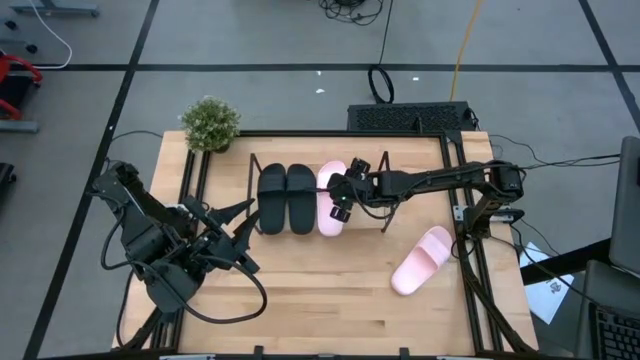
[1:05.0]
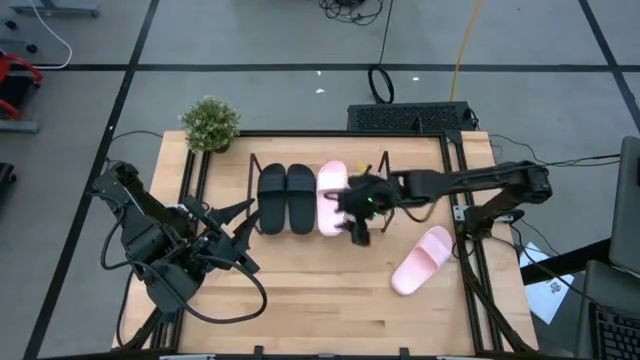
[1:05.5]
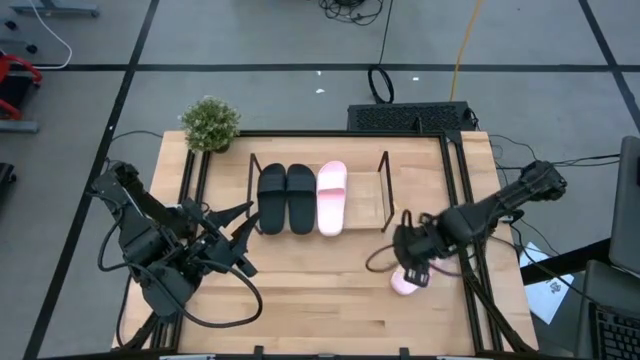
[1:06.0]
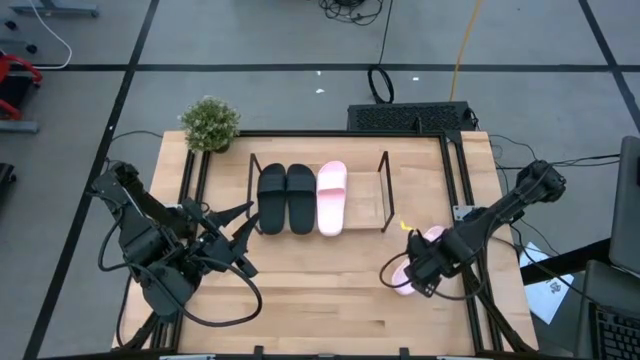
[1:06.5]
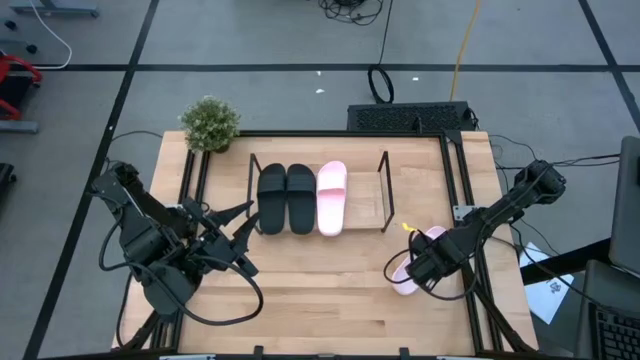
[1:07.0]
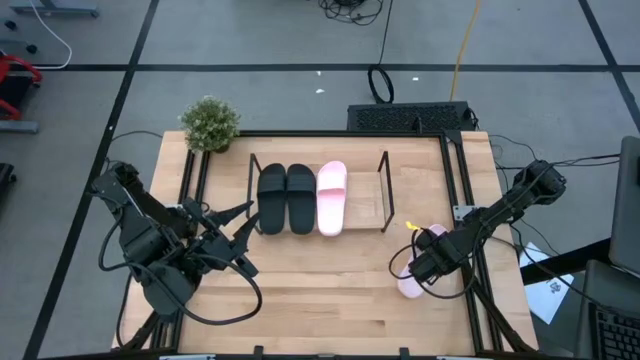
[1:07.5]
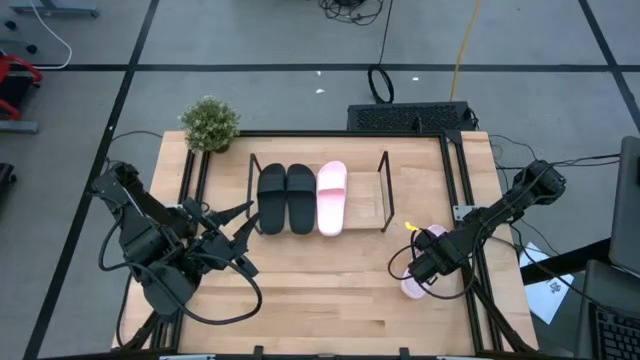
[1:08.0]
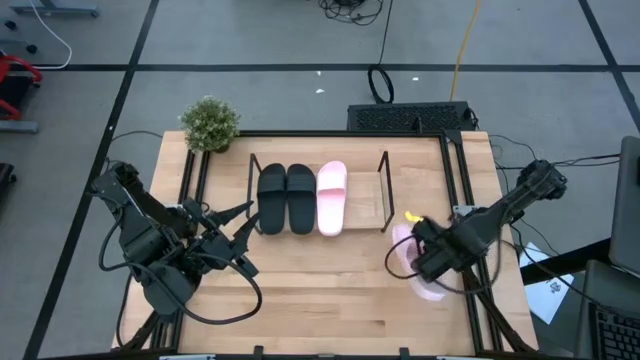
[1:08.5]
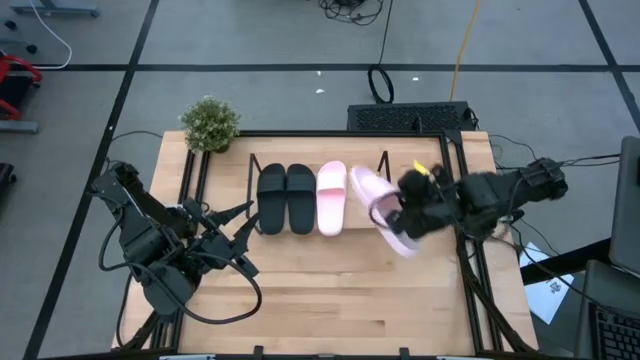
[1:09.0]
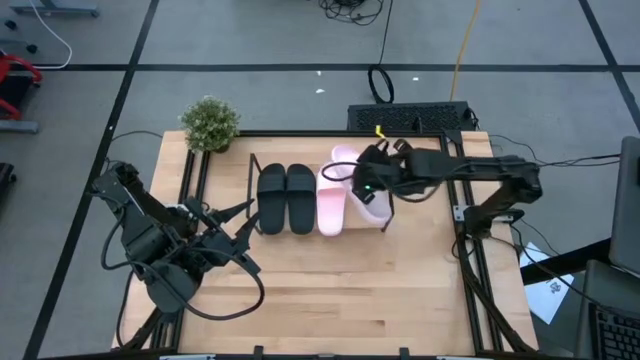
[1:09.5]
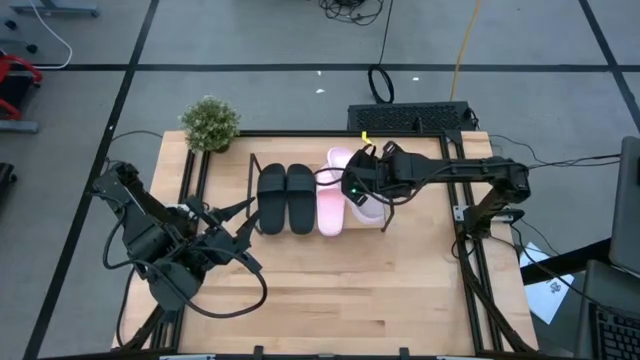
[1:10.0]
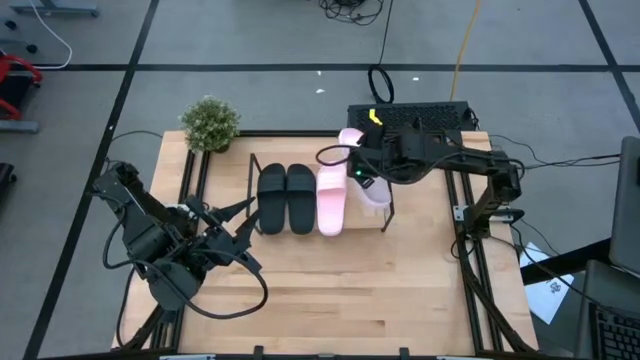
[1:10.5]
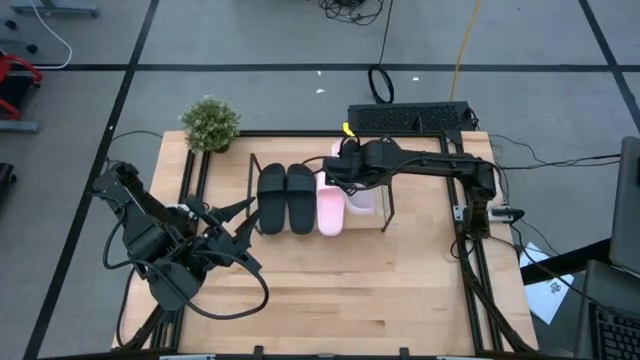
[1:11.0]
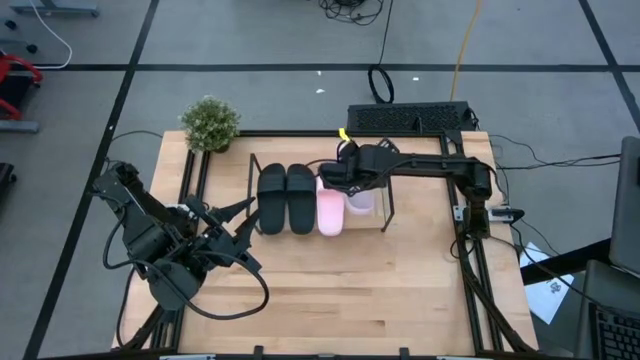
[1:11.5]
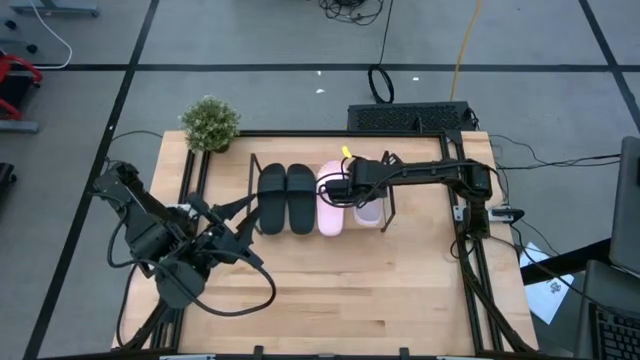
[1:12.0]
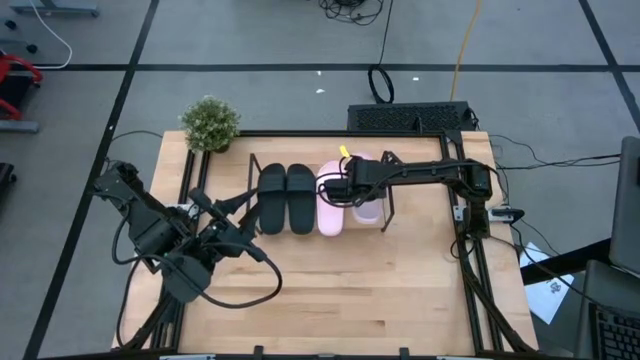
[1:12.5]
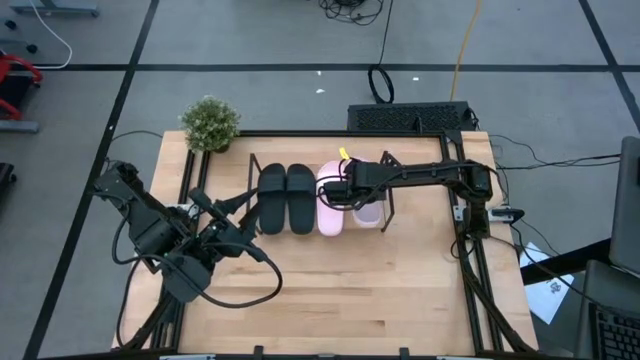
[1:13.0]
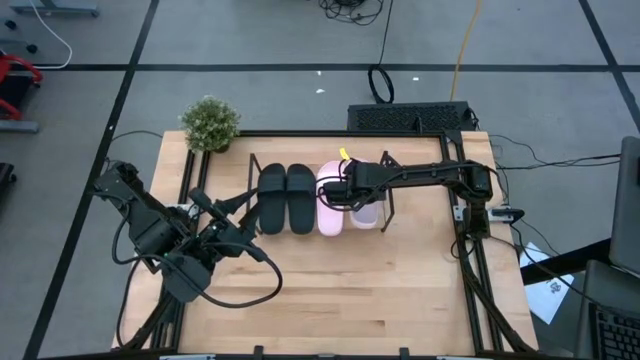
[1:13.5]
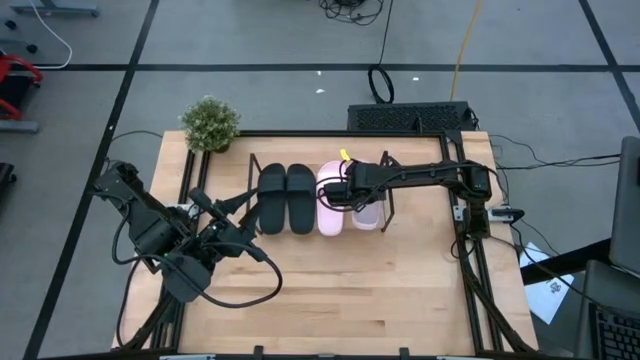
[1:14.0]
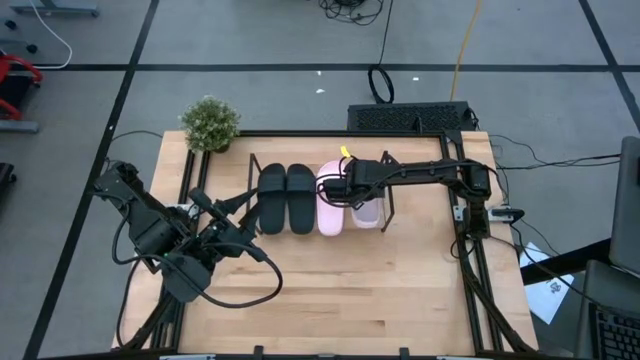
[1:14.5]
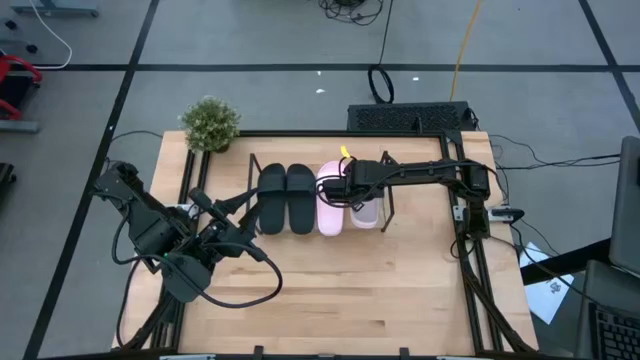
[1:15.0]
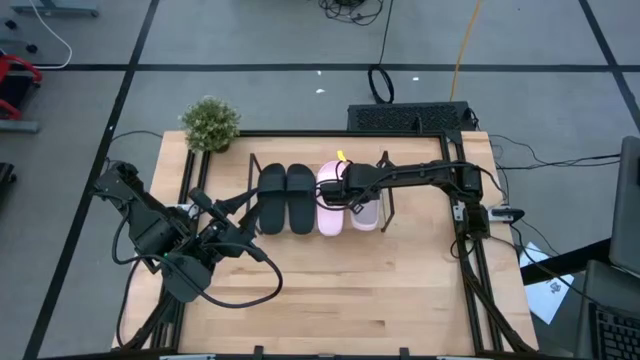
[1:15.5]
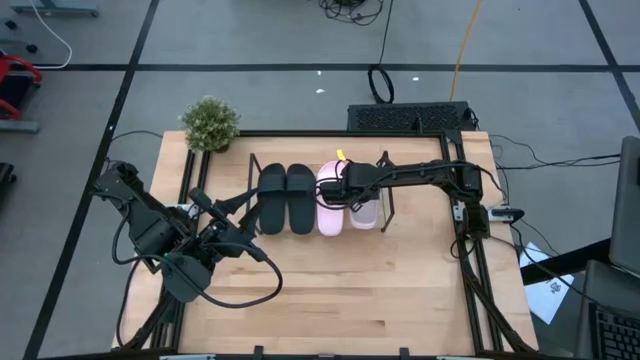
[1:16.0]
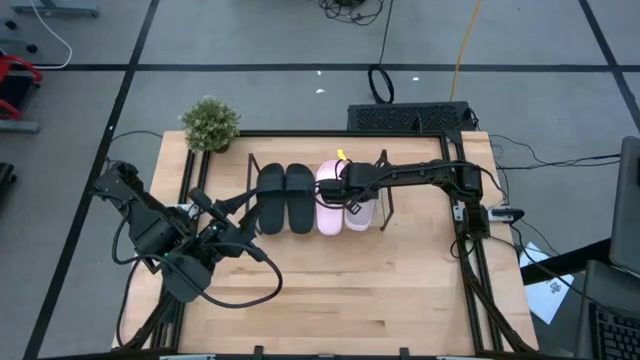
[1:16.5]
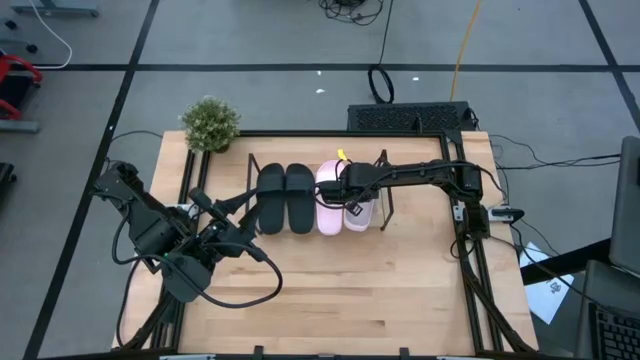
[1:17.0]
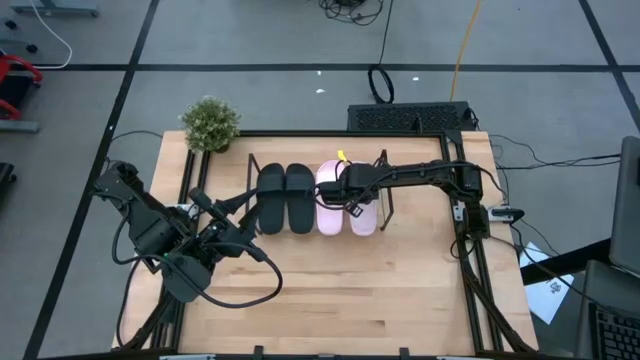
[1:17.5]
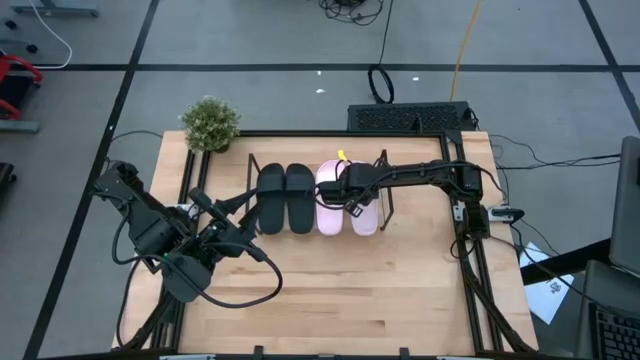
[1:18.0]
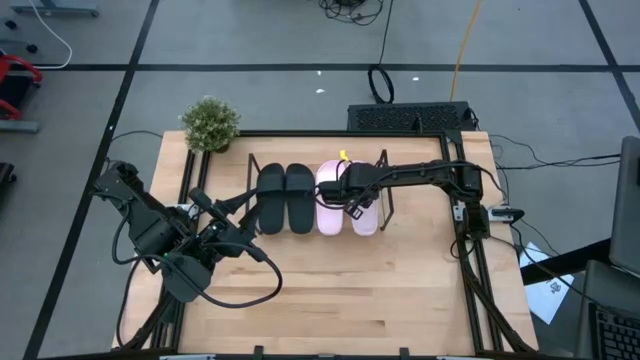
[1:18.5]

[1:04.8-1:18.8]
Task: Pick and place slides into the shelf
Put the pink slipper on the shelf

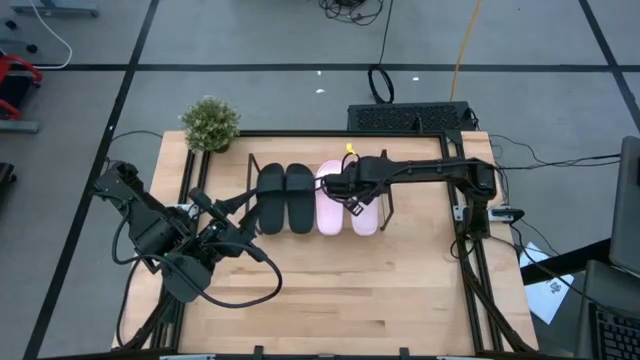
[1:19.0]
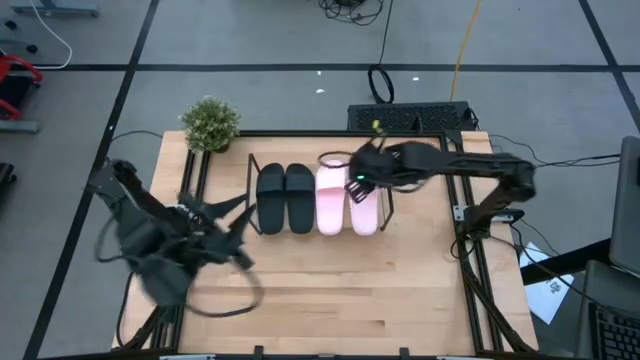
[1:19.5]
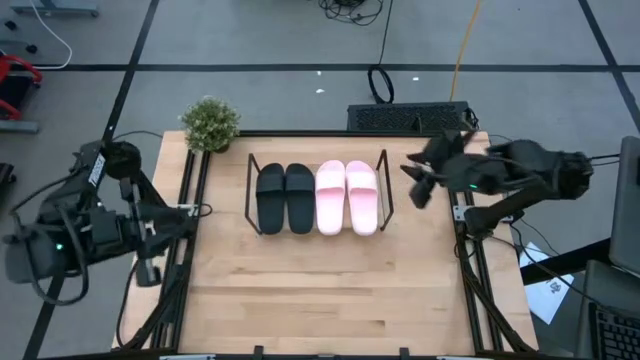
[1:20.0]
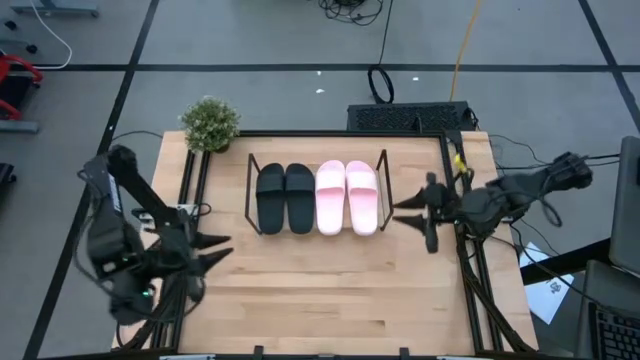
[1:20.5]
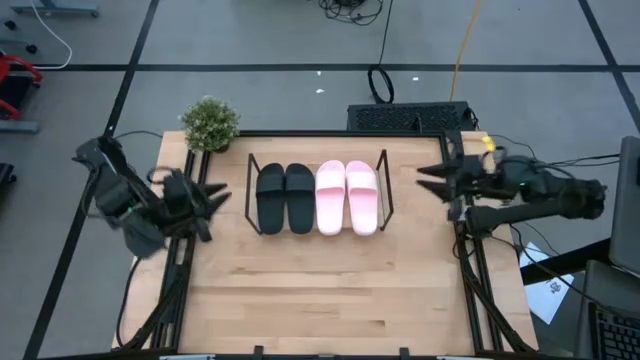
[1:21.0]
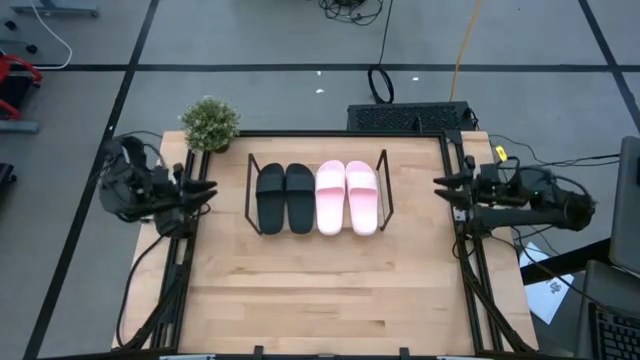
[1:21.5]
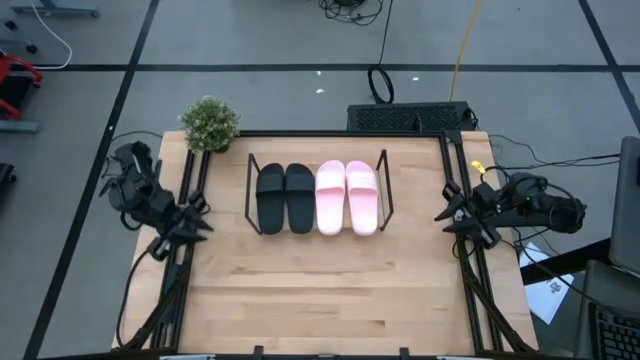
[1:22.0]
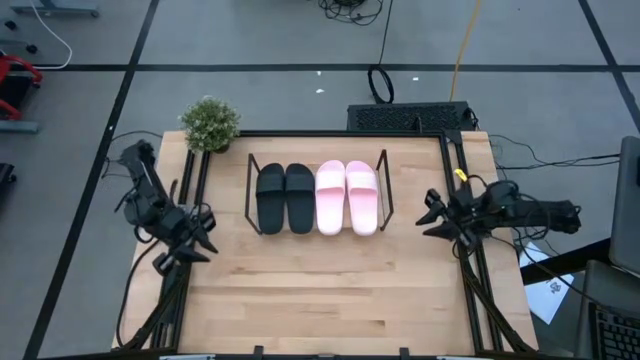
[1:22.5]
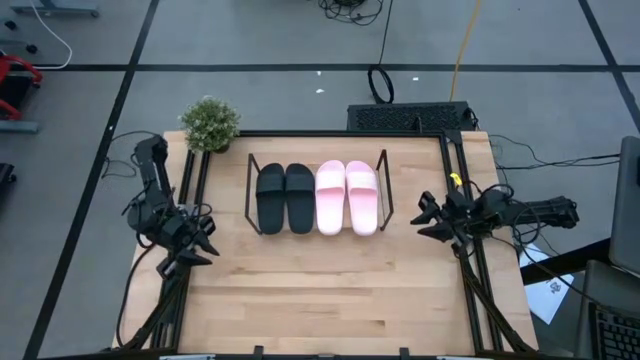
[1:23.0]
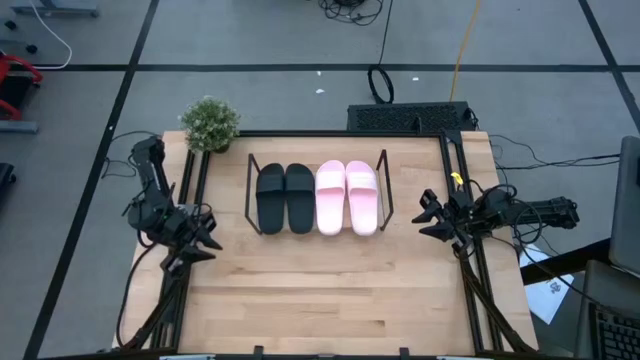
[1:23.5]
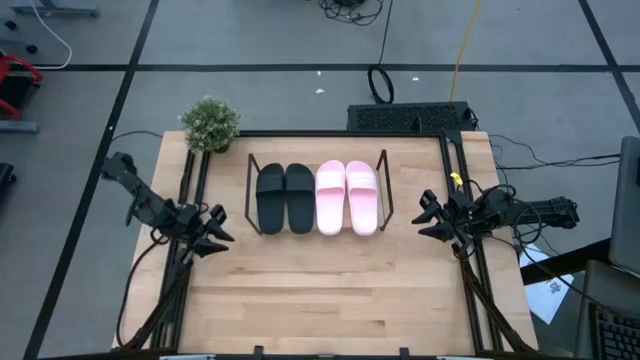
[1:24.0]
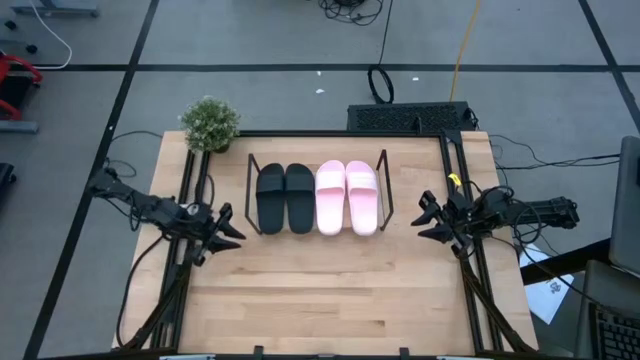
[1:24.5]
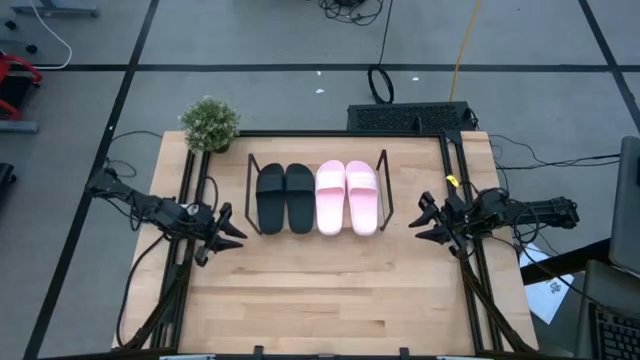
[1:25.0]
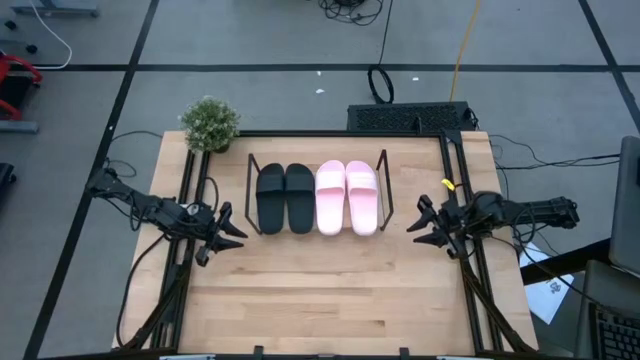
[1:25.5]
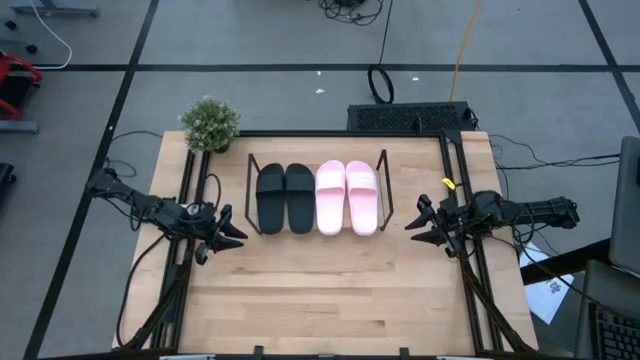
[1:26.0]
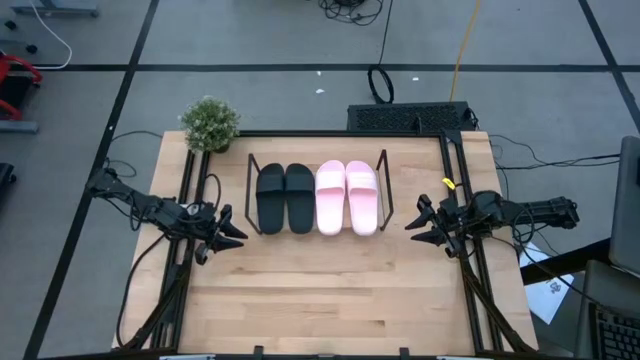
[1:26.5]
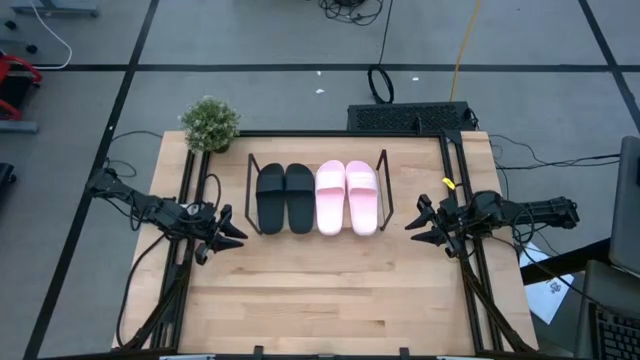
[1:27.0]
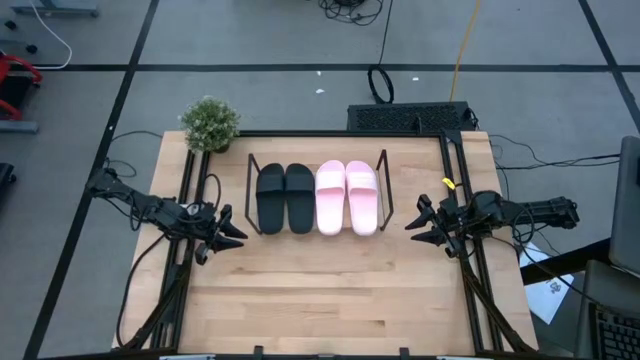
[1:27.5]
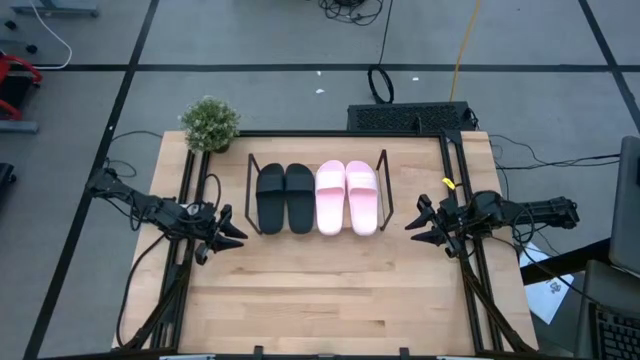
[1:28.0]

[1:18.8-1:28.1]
Return to Home Position
